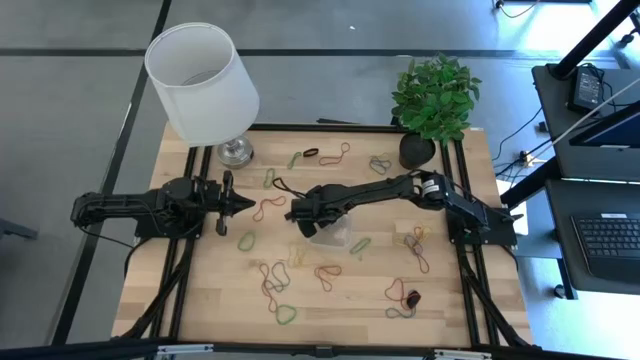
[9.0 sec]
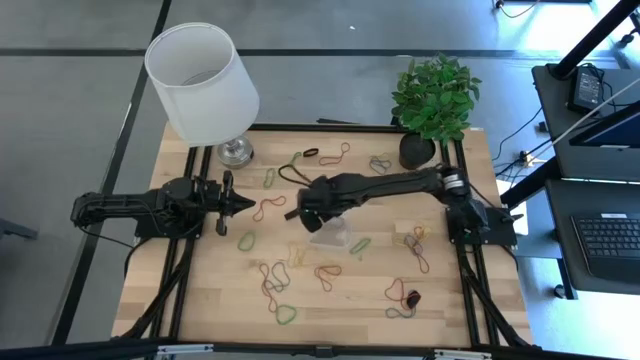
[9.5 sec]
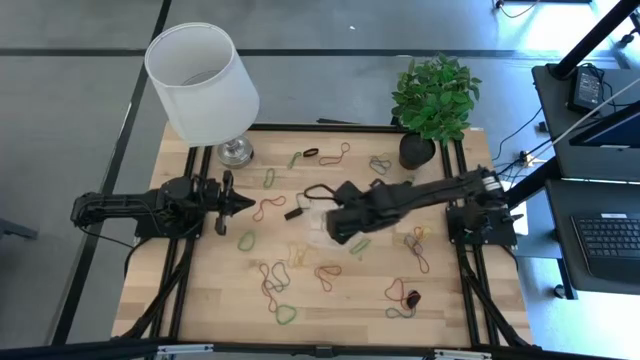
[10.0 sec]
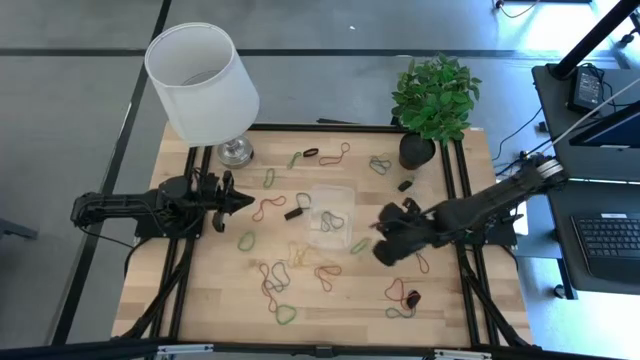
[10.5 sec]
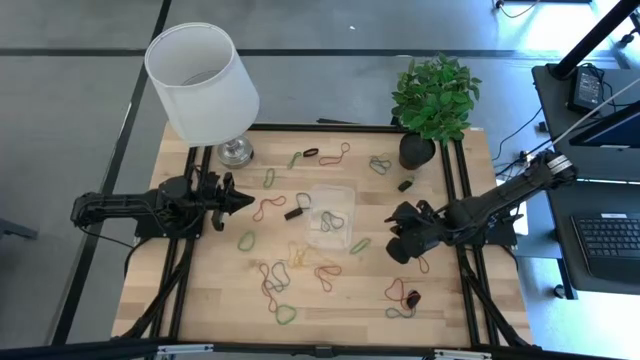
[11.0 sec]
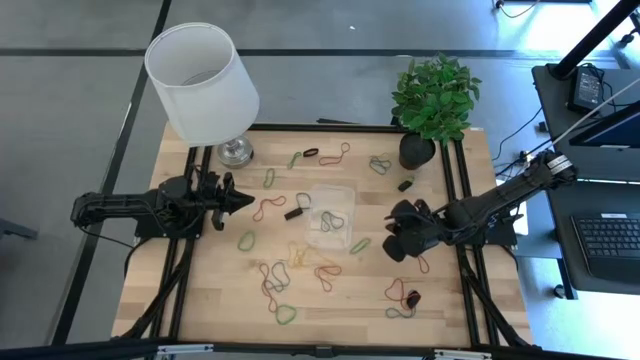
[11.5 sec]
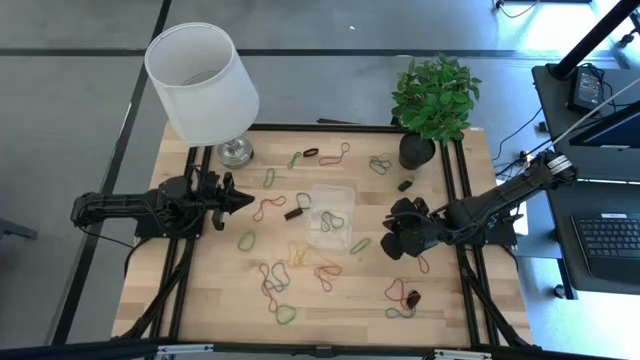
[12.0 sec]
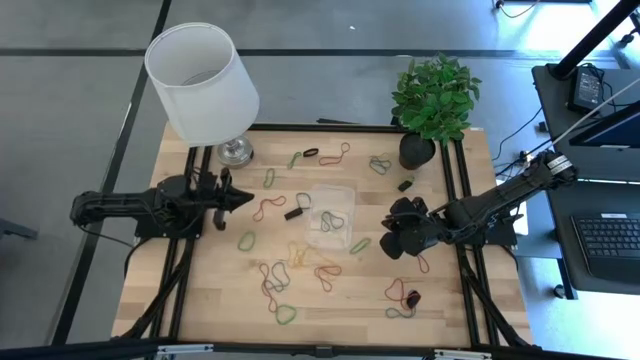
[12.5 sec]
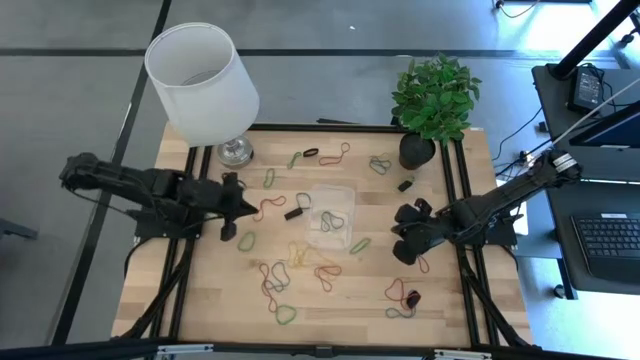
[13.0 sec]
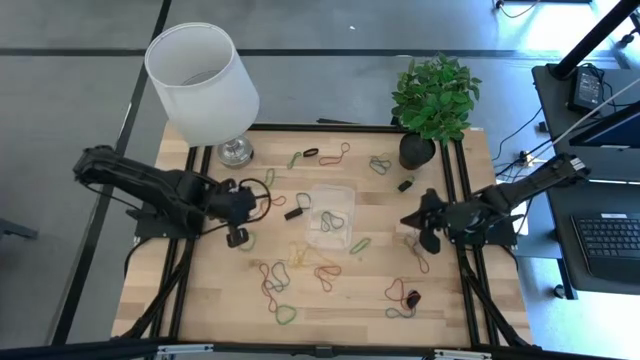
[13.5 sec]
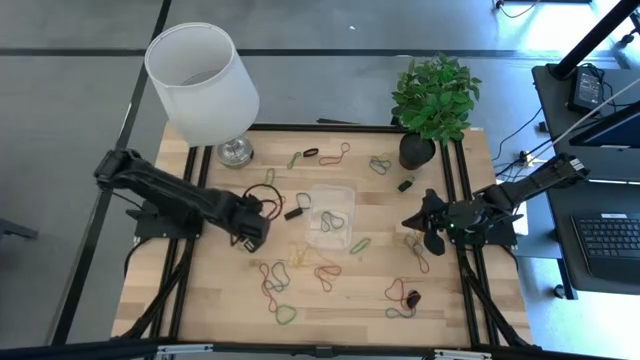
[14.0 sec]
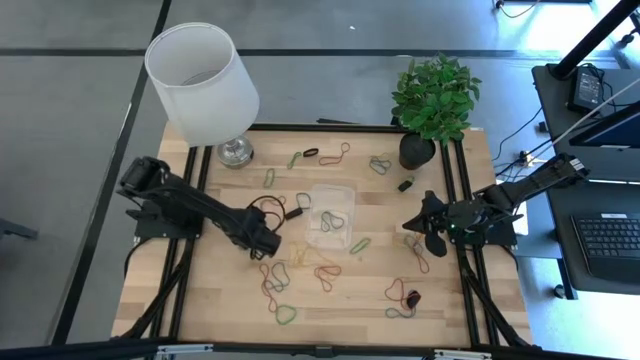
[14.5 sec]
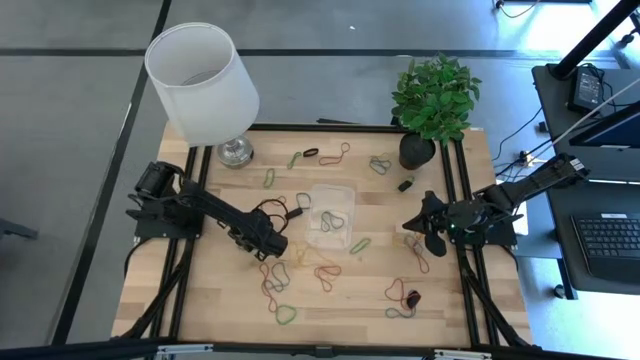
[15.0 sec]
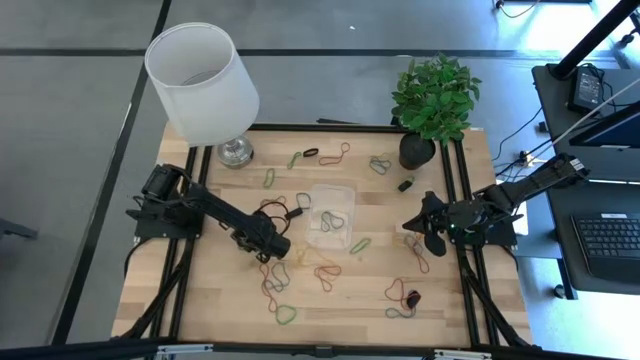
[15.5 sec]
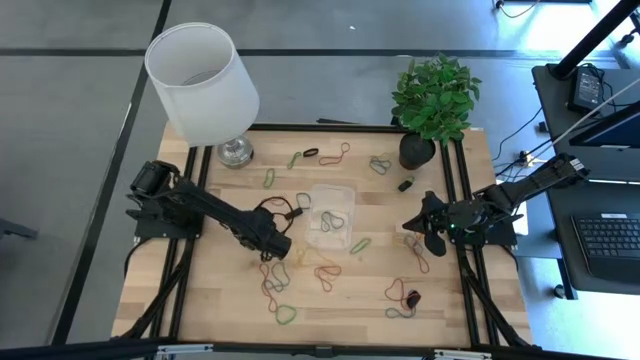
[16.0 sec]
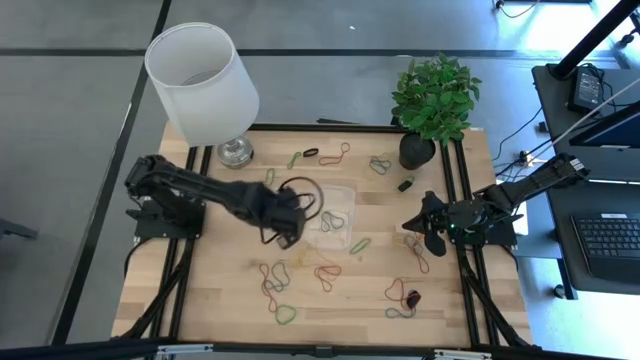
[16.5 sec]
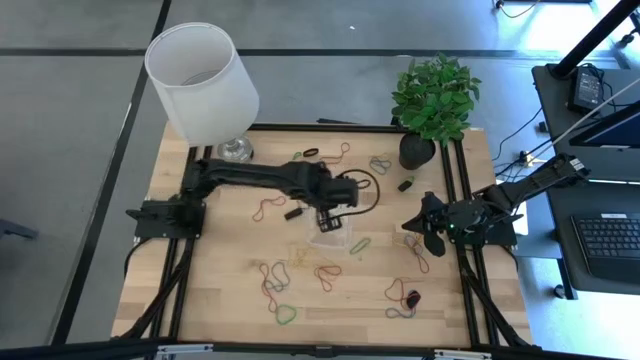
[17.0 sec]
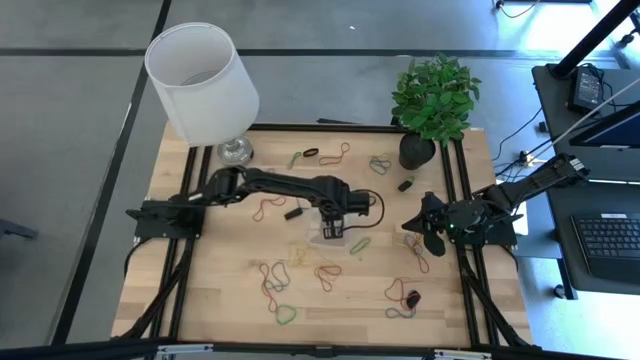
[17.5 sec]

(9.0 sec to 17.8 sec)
Task: Pick and place rubber bands into bin
Put the green rubber band into the bin

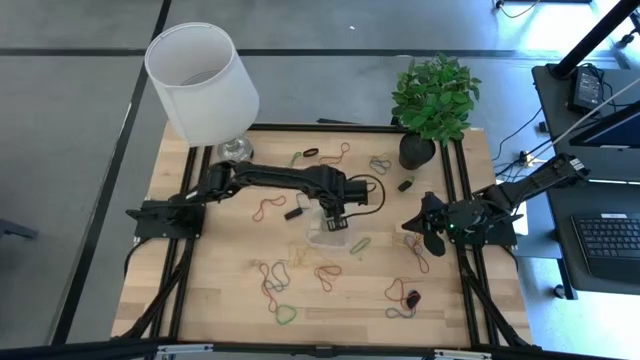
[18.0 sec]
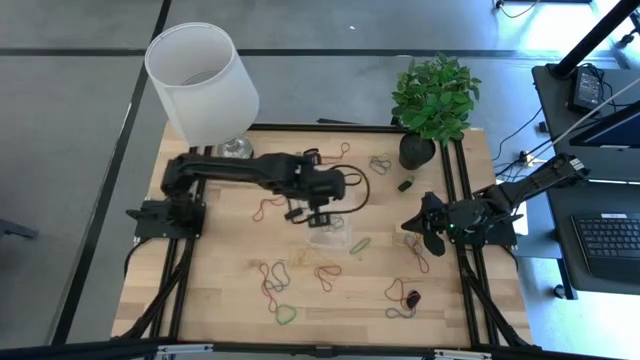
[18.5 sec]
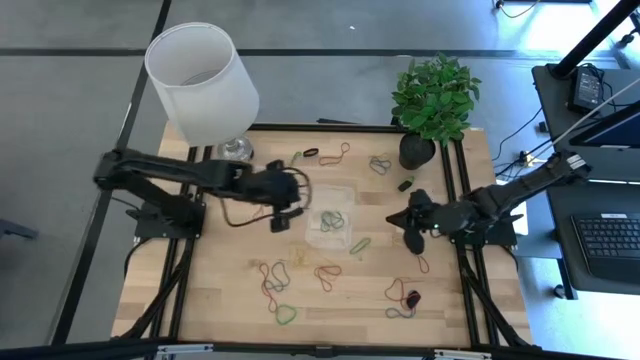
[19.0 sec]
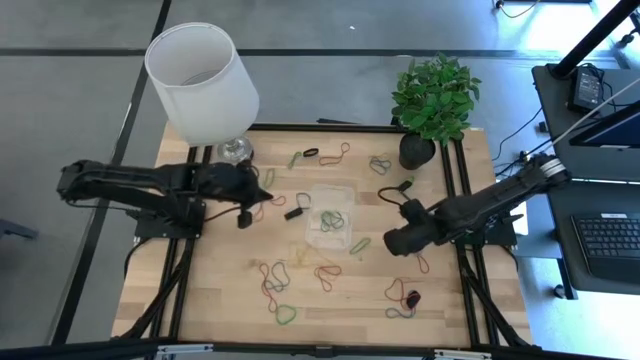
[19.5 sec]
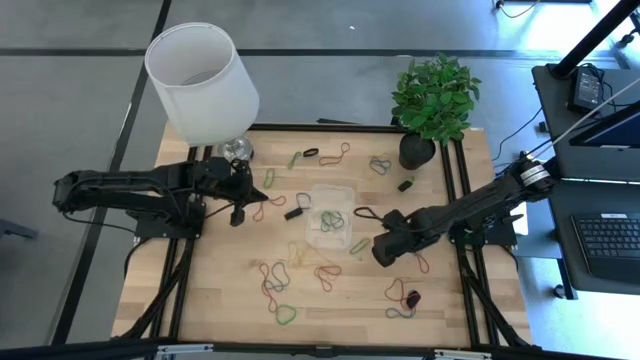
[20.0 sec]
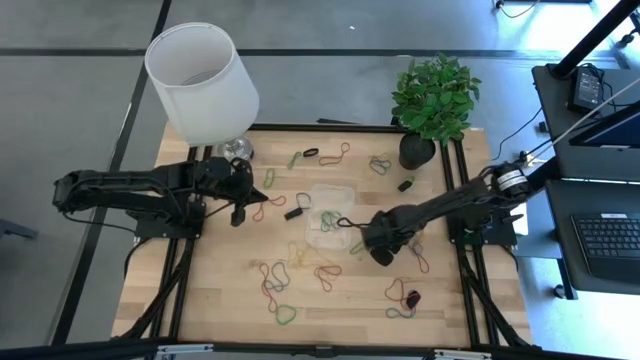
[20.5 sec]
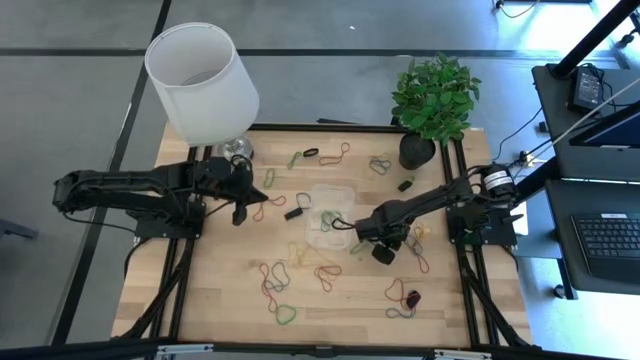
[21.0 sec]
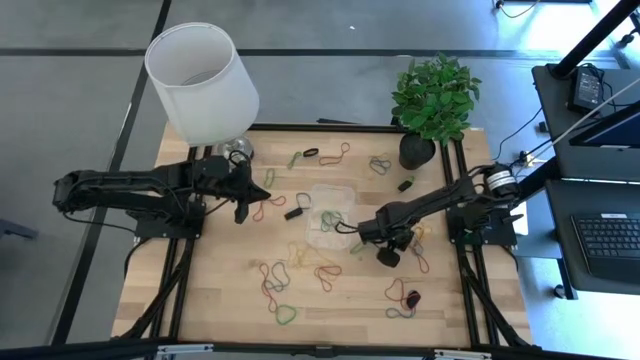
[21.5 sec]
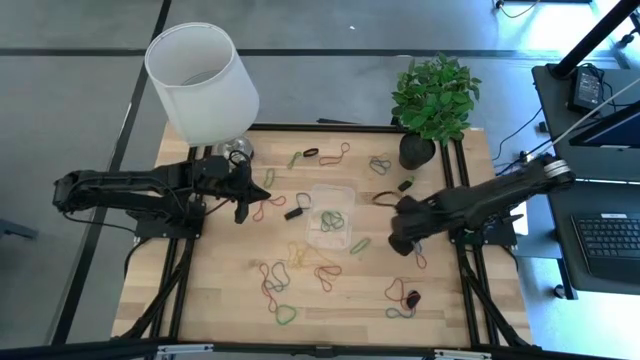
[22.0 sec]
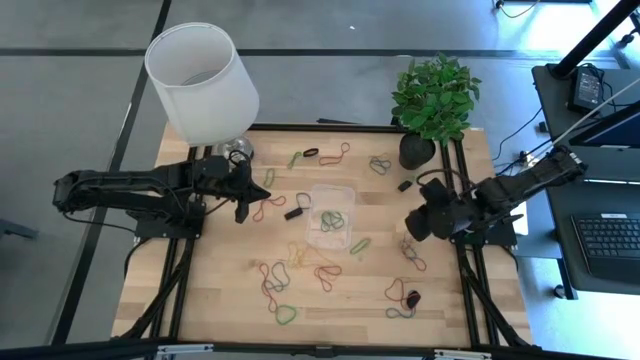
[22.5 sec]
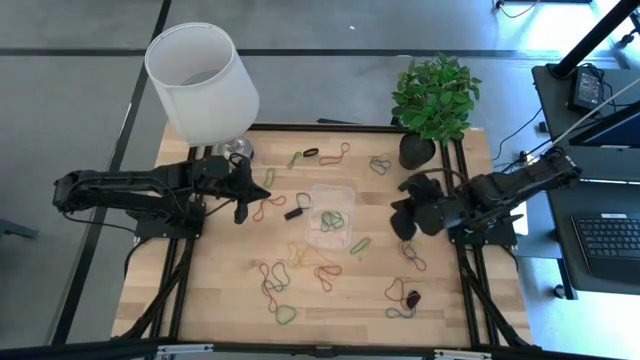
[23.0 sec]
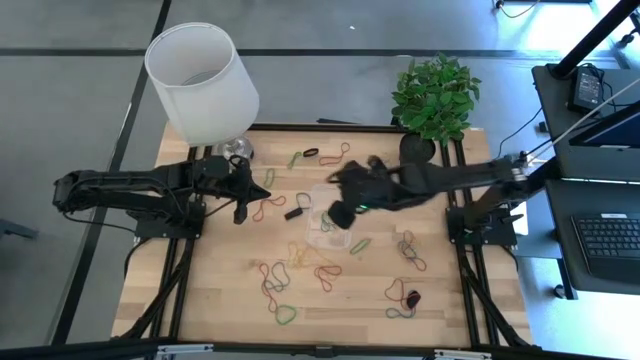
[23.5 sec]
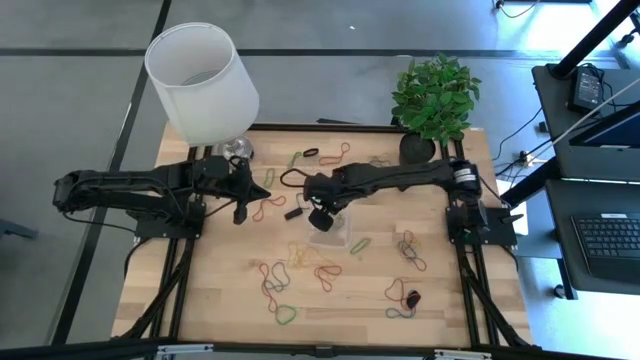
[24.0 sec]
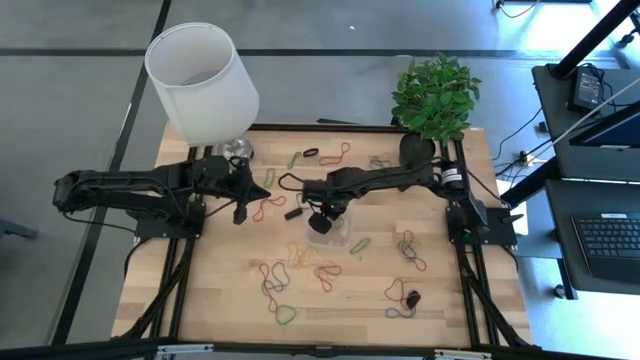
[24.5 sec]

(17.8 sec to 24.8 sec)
Put the yellow rubber band into the bin

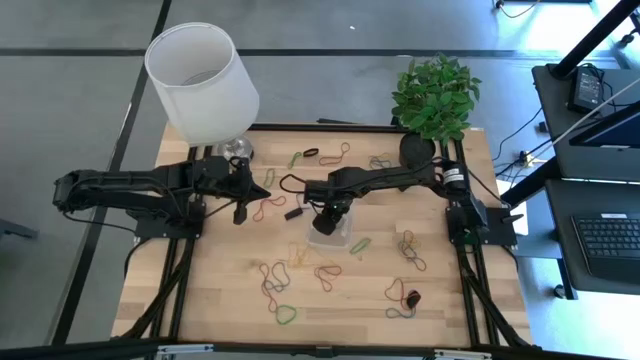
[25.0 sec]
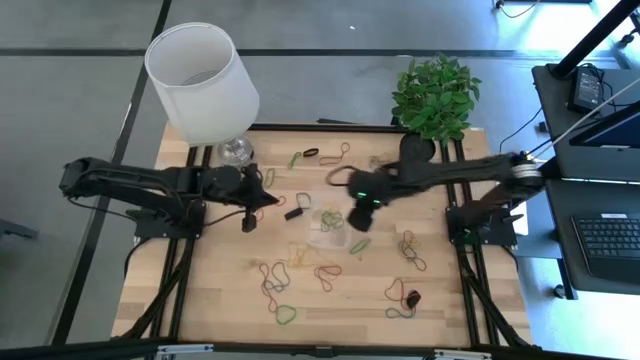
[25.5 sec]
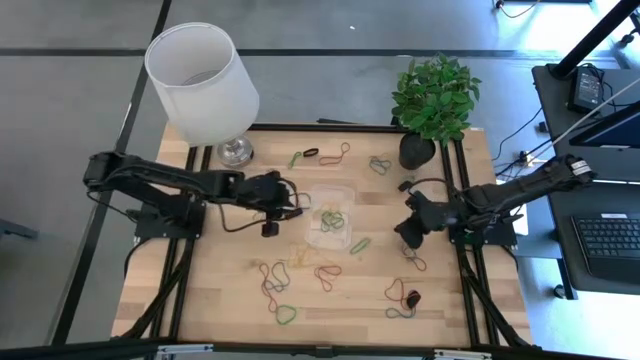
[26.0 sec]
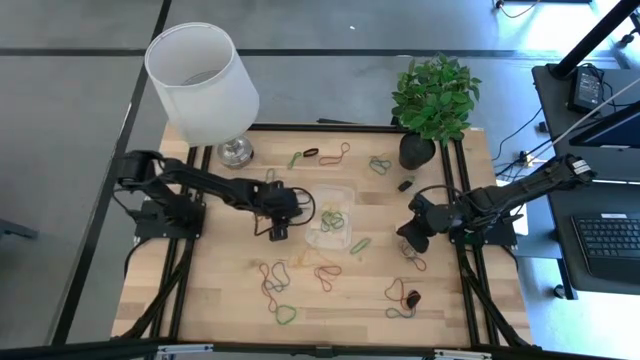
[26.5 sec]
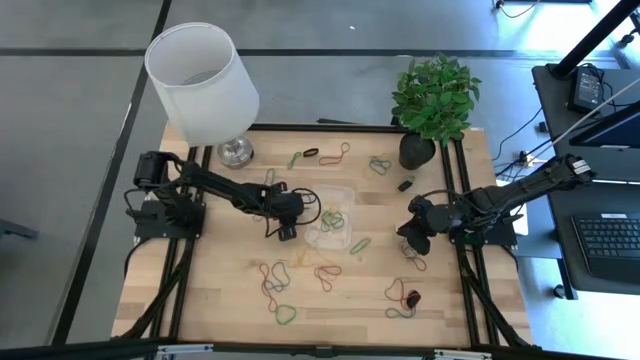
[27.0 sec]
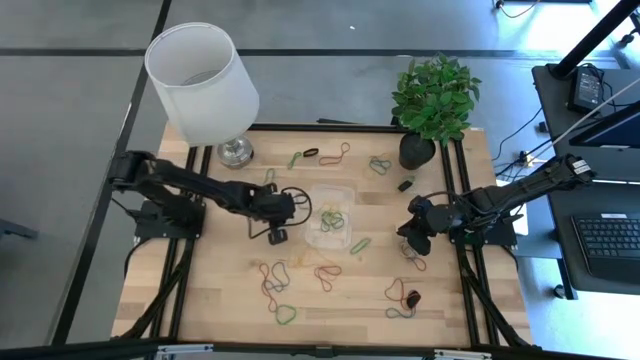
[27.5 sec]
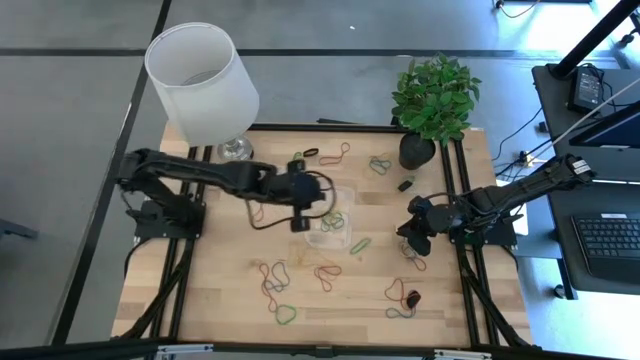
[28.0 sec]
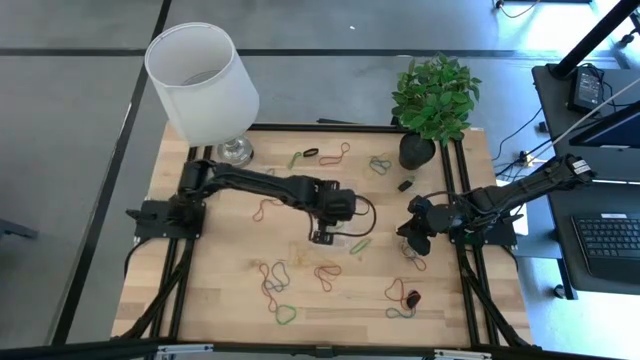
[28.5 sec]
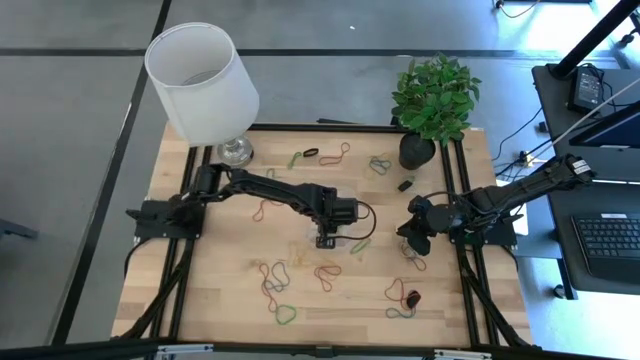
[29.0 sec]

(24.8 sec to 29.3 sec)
Put the black rubber band into the bin
